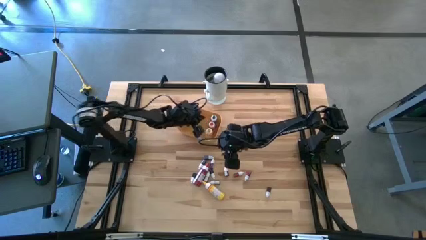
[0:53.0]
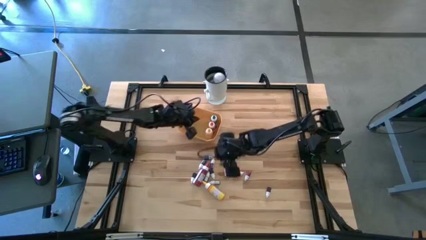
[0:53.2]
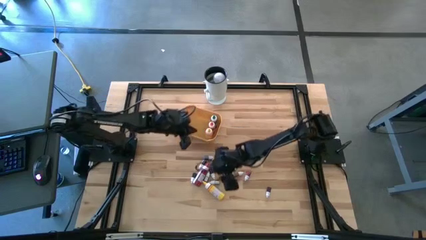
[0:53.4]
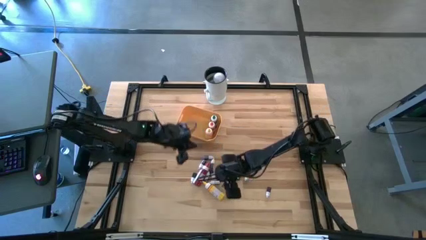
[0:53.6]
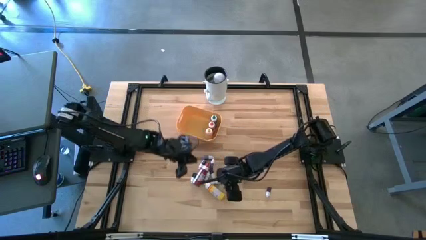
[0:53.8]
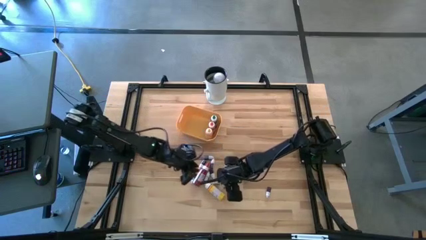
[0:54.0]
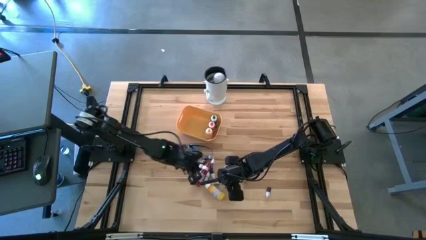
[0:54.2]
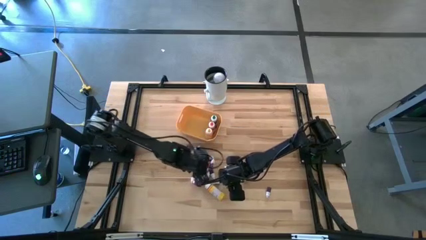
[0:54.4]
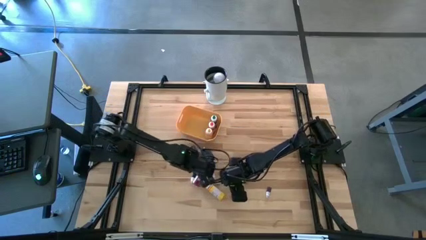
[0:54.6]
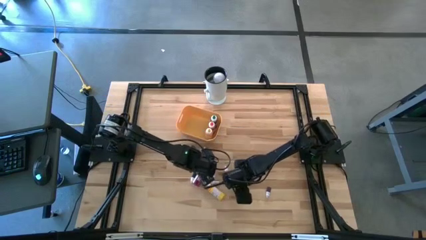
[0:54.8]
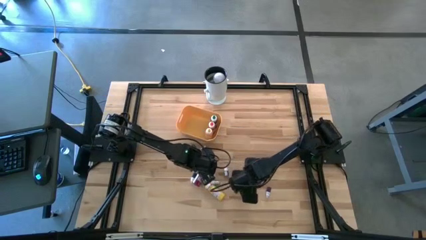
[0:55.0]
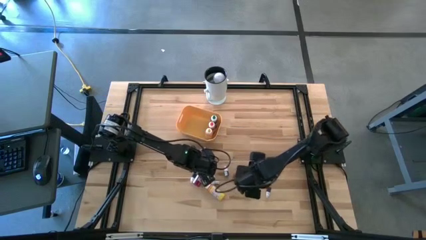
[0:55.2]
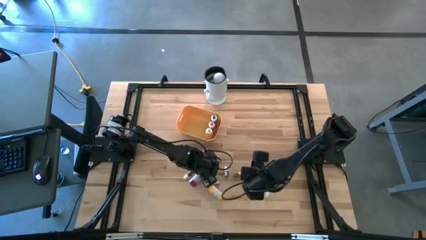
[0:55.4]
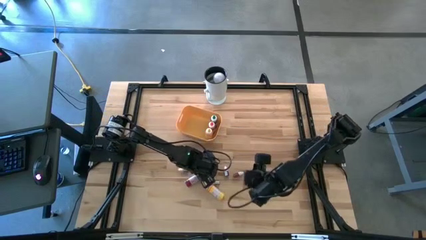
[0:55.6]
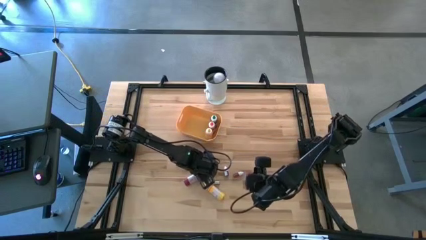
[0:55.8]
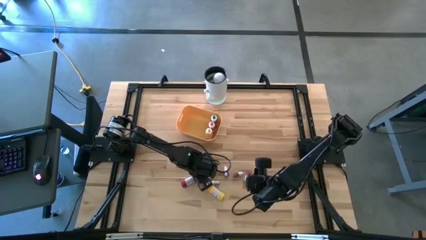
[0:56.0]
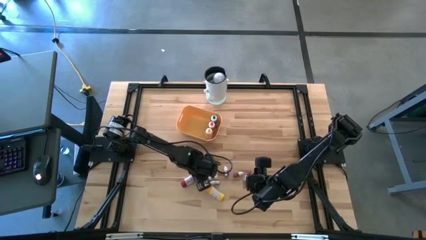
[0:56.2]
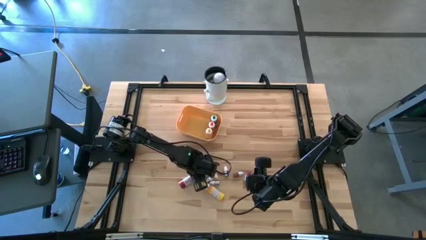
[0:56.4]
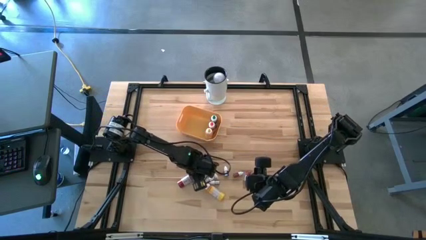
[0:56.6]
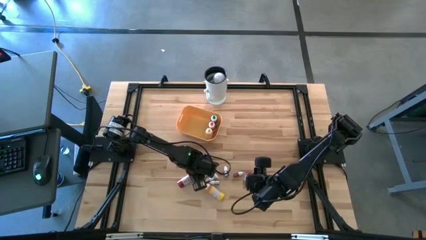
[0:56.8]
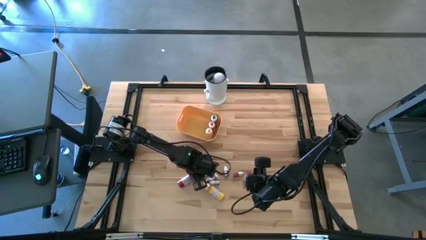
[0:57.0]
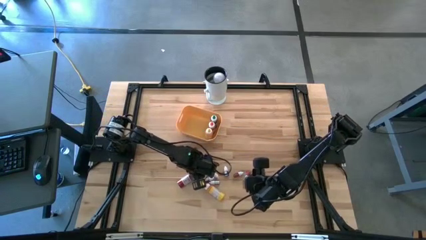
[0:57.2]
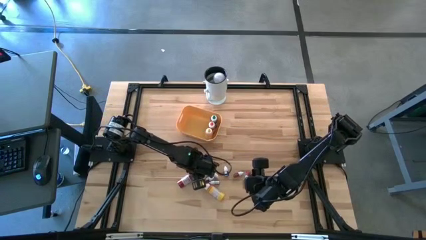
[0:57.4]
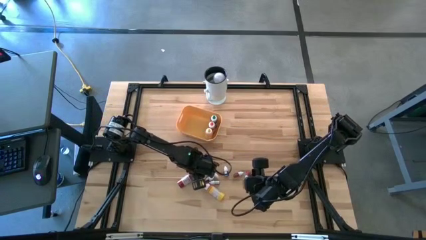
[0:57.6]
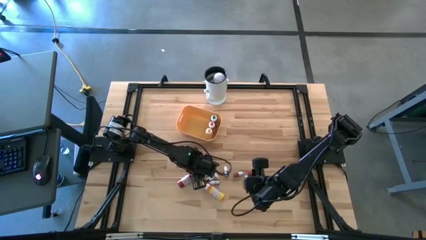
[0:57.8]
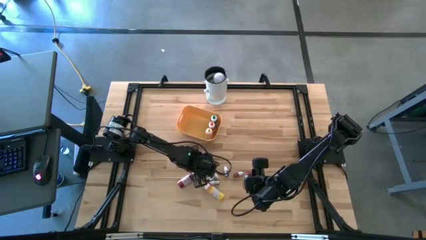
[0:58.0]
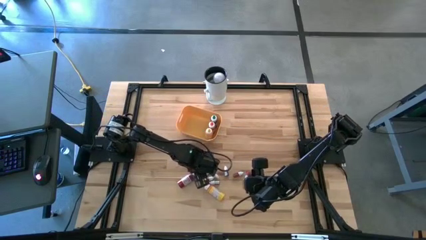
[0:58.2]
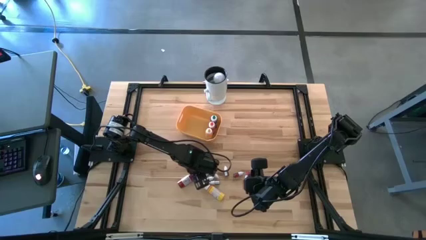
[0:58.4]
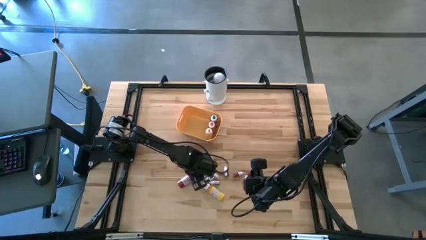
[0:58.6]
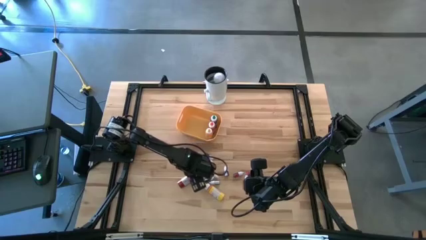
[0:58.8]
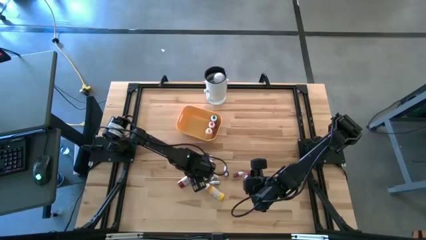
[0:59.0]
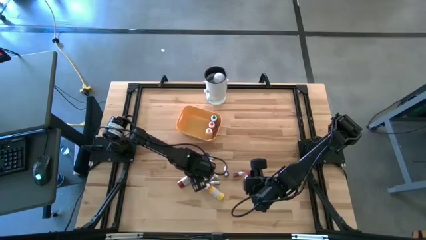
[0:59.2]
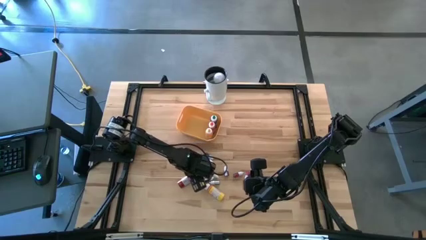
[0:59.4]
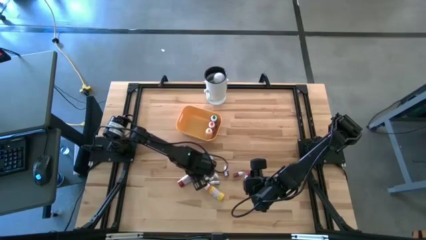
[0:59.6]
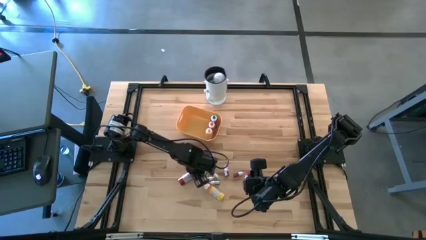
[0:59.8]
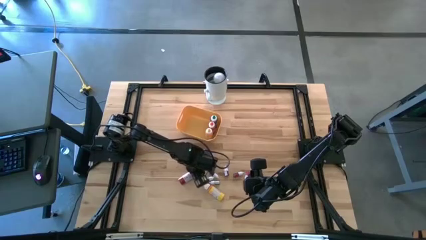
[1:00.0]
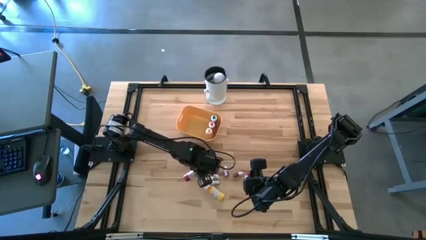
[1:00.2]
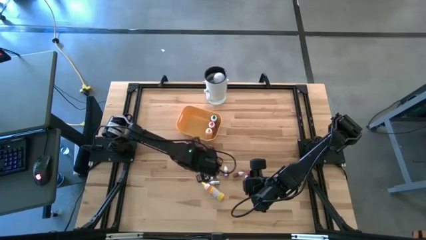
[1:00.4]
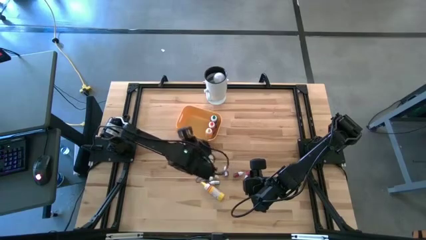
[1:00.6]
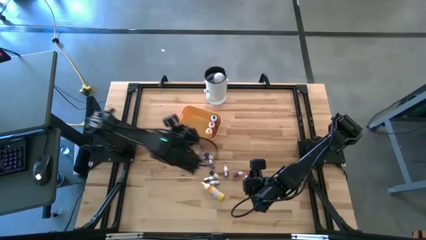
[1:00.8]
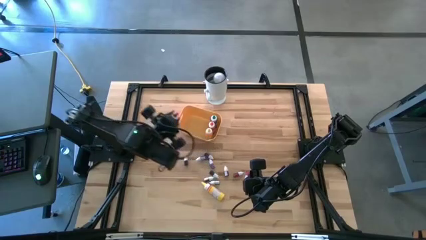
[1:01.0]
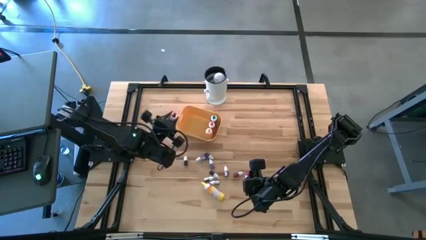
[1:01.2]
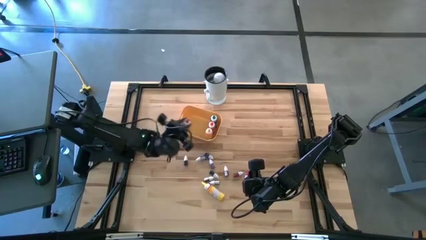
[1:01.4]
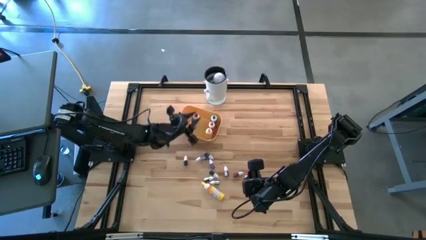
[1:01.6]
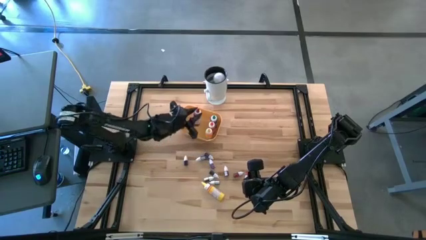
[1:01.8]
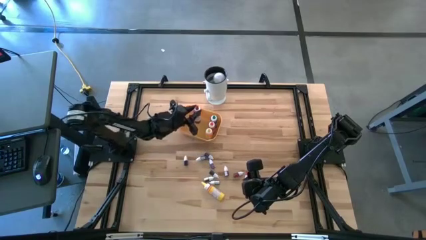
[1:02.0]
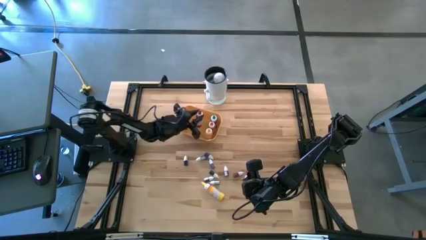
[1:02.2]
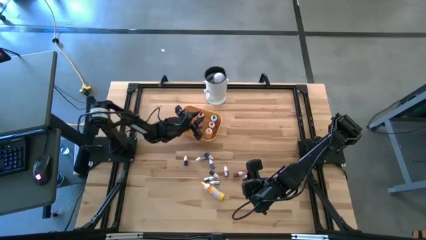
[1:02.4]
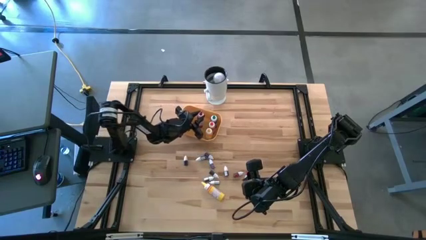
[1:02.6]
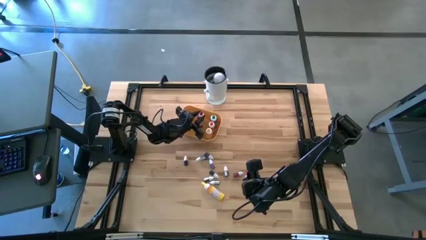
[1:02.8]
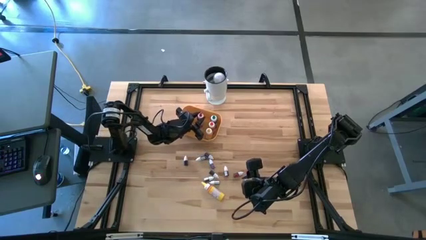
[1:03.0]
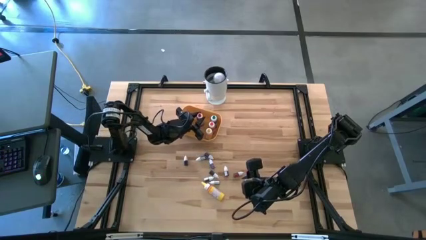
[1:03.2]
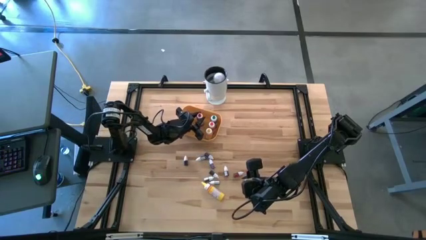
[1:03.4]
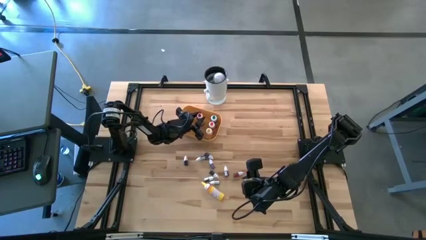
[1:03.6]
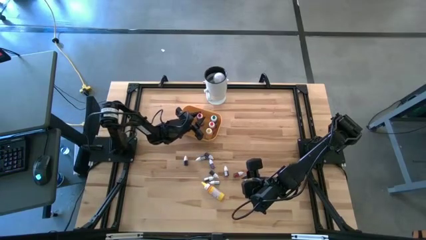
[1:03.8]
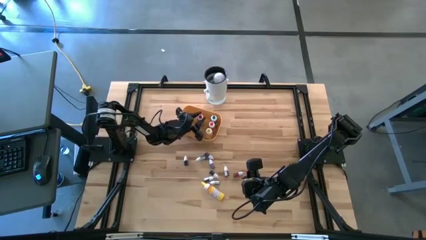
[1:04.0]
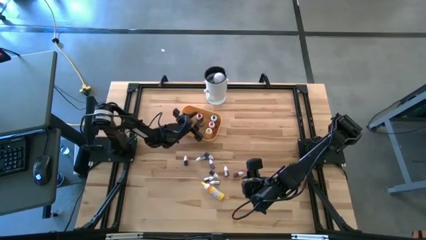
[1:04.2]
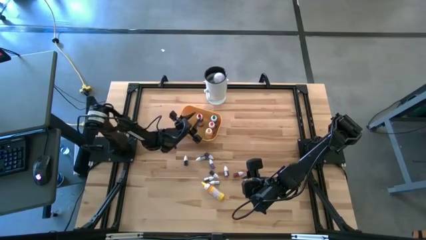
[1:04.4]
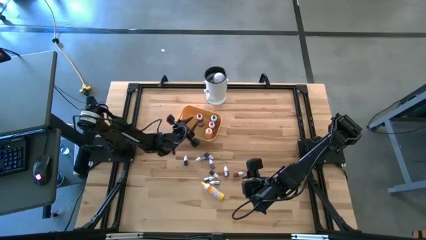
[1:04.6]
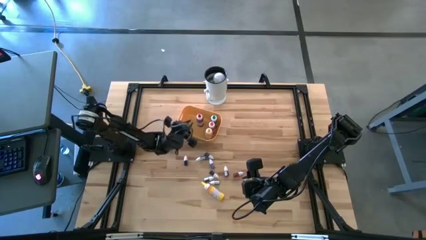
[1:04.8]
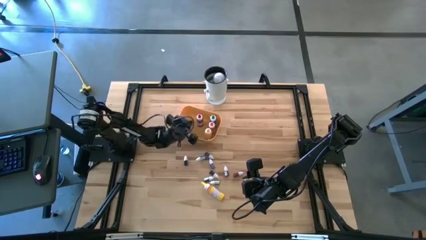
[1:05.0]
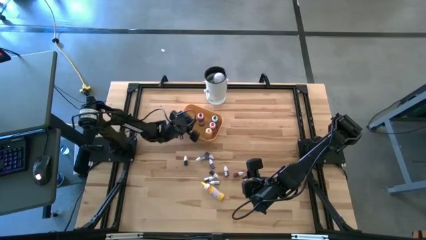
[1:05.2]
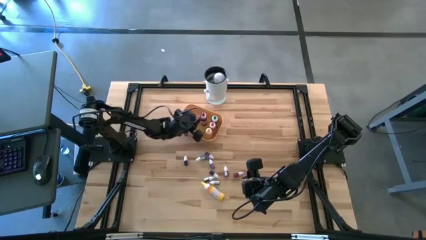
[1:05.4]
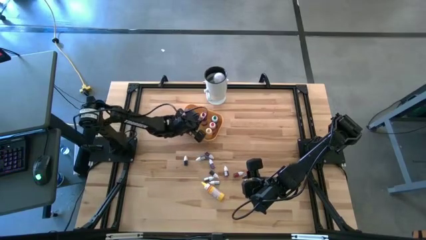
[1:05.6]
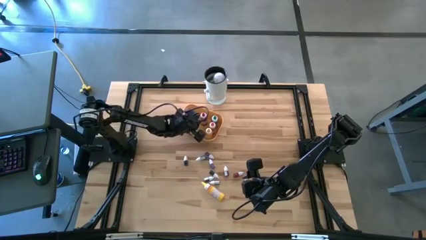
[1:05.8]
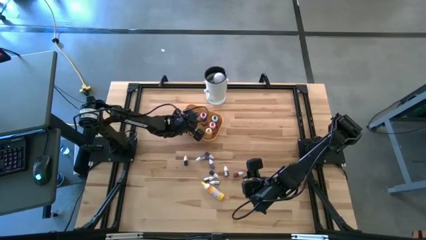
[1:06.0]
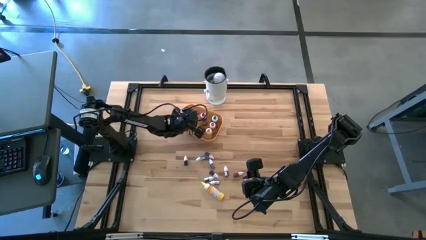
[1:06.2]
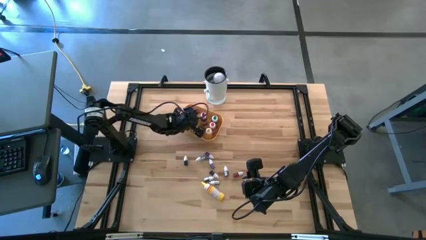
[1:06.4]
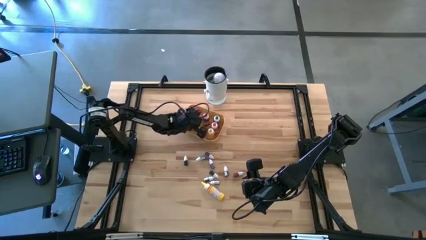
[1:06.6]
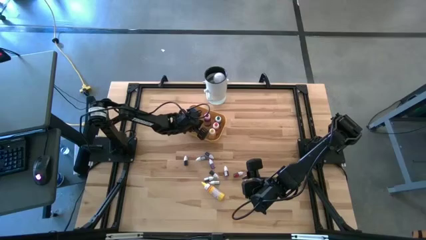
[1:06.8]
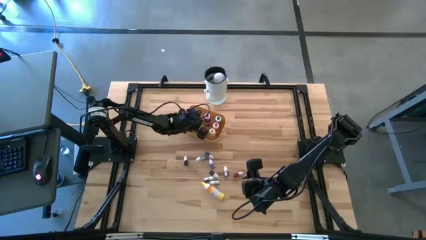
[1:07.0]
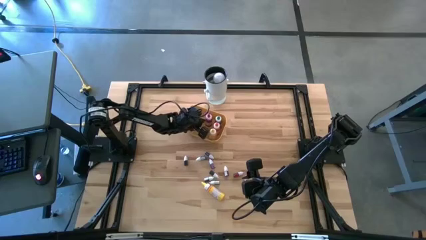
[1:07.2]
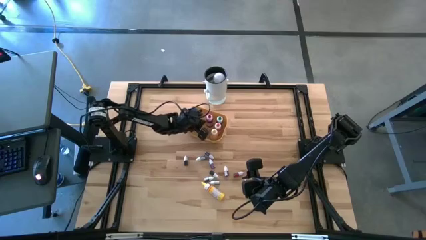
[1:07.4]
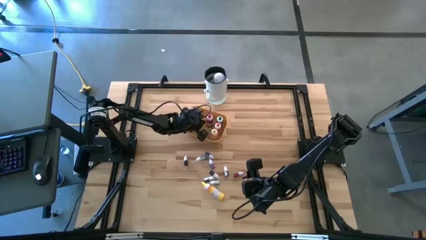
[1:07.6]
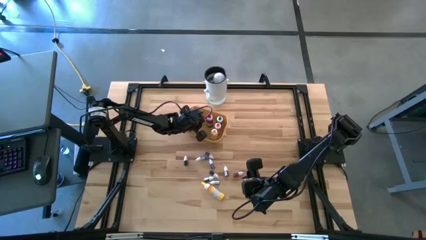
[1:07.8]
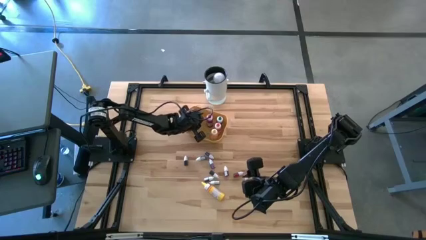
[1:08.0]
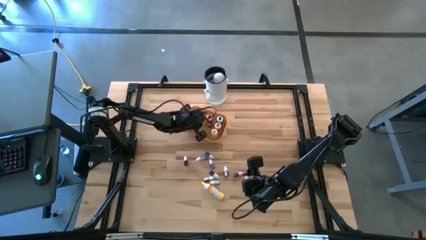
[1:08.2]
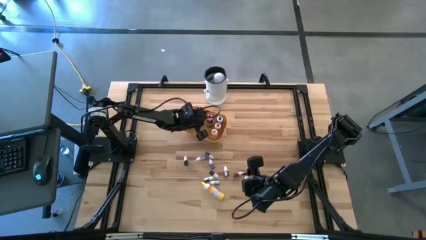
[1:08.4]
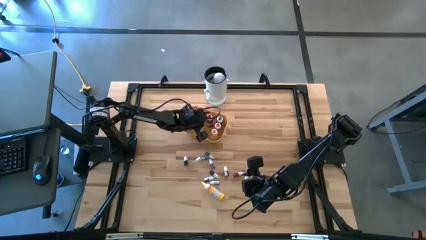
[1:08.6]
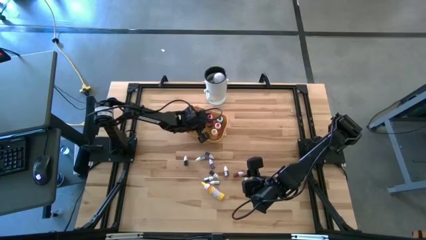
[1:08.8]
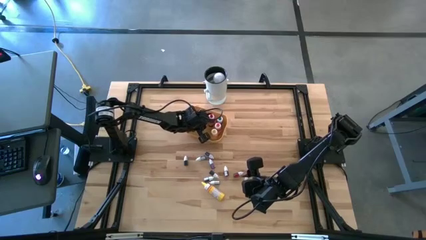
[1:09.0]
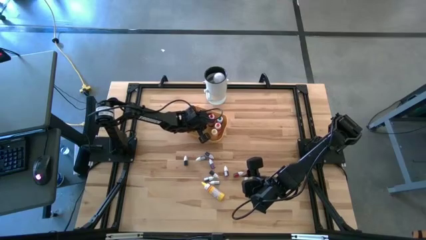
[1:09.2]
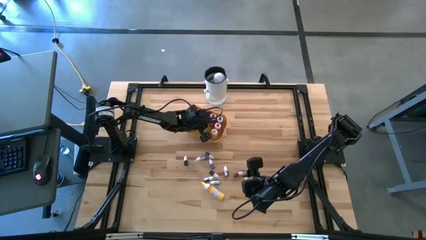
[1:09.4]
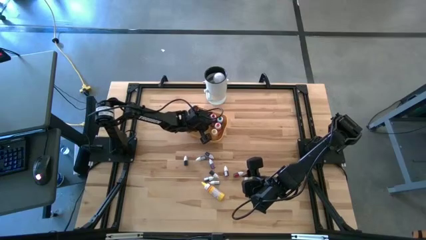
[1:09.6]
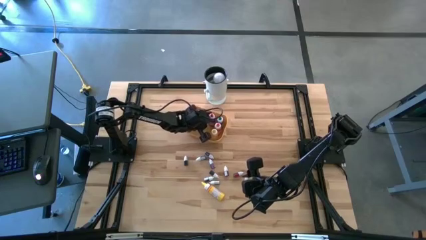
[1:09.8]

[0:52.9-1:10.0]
Task: Pick & Place food coloring
Put the large red food coloring bottle into the yellow bin
